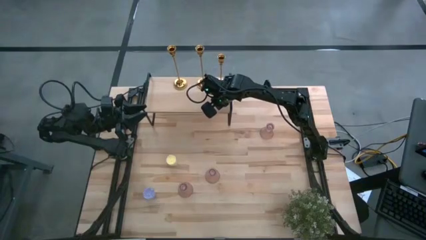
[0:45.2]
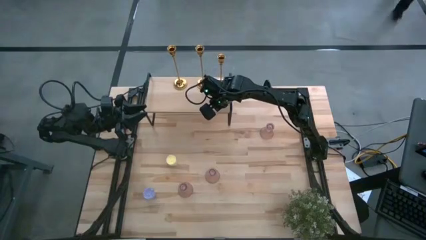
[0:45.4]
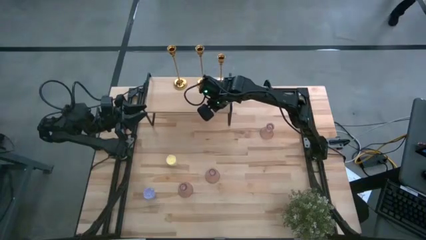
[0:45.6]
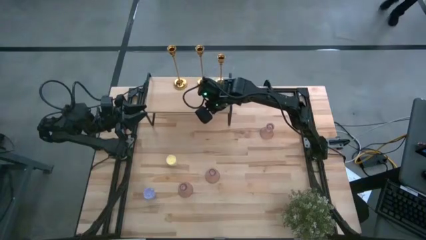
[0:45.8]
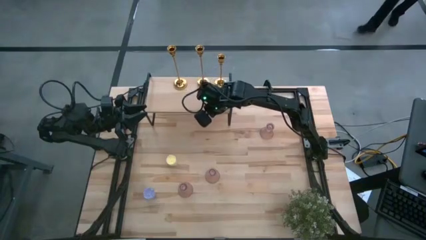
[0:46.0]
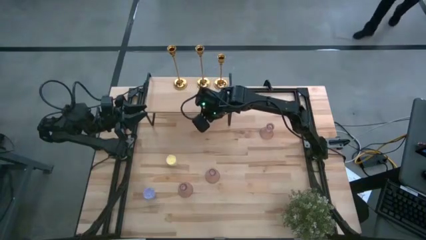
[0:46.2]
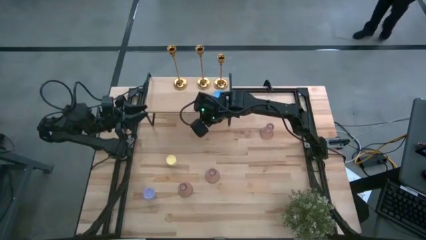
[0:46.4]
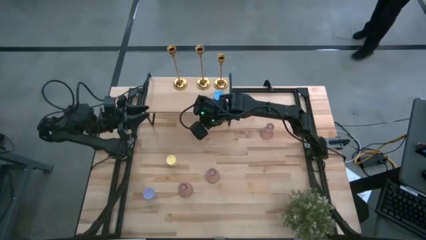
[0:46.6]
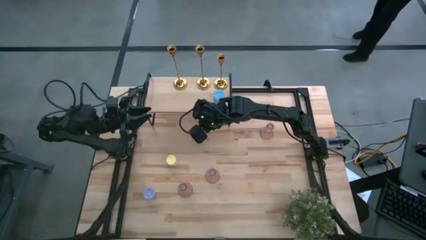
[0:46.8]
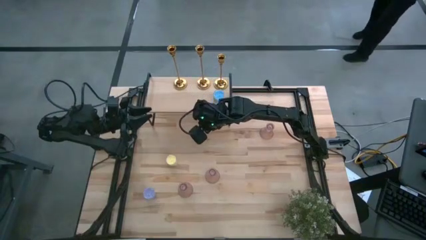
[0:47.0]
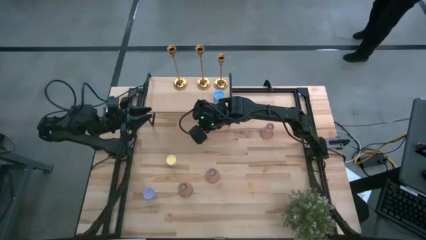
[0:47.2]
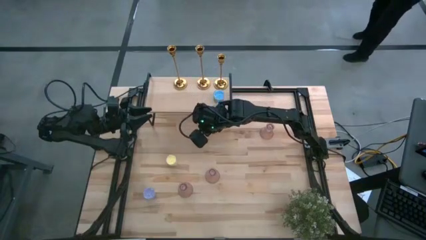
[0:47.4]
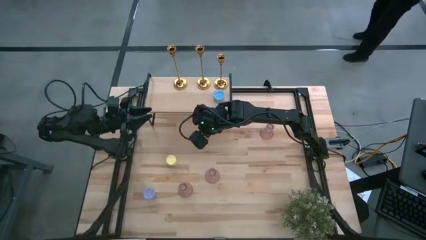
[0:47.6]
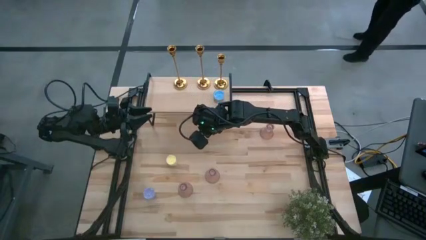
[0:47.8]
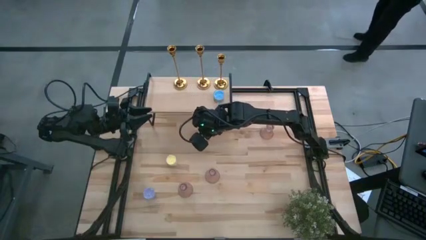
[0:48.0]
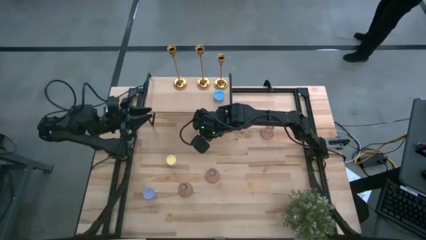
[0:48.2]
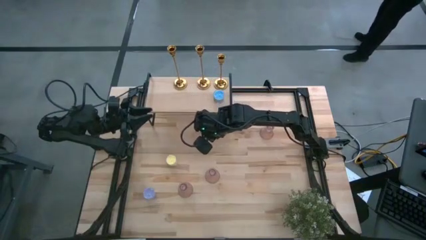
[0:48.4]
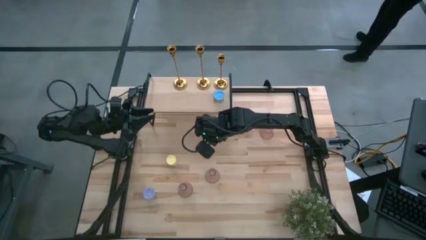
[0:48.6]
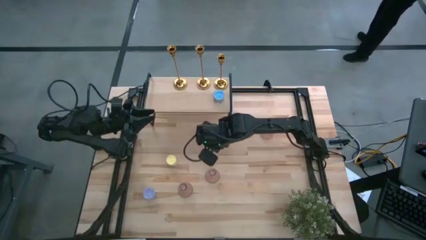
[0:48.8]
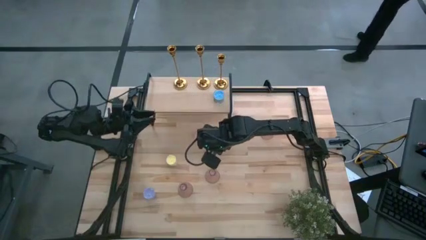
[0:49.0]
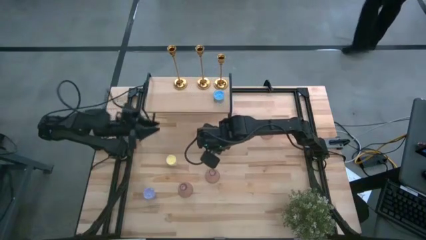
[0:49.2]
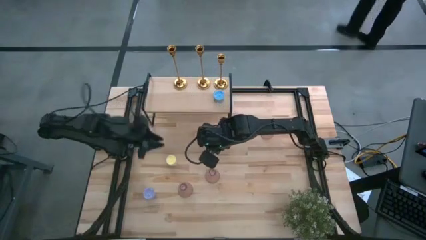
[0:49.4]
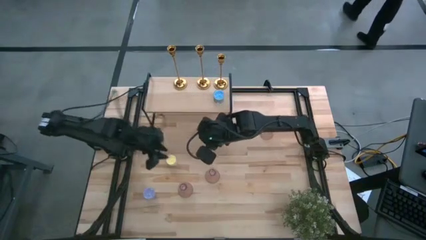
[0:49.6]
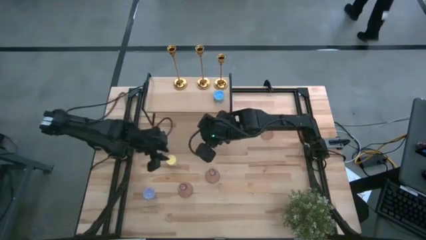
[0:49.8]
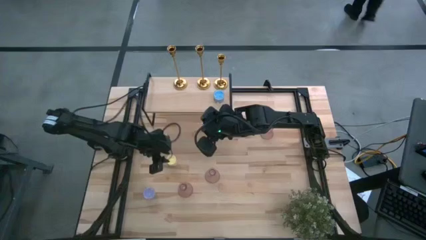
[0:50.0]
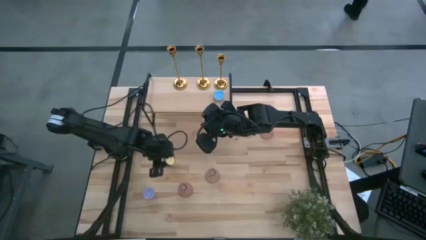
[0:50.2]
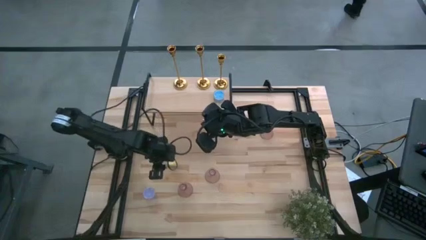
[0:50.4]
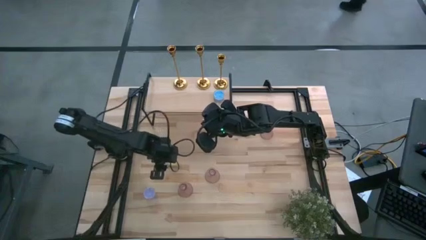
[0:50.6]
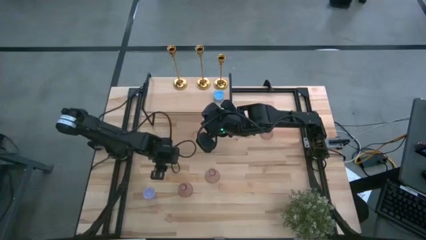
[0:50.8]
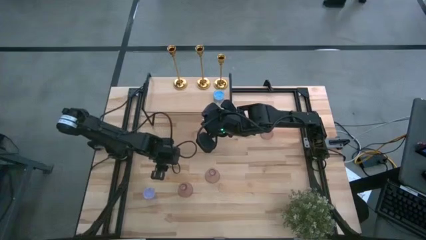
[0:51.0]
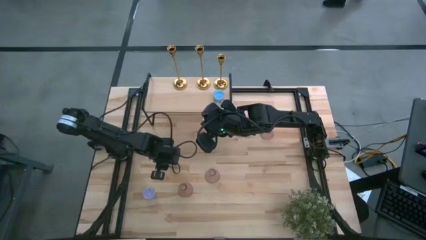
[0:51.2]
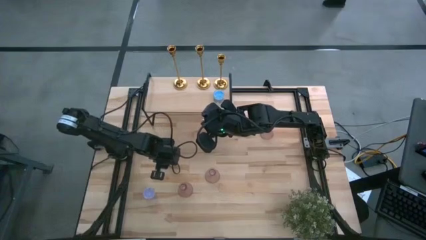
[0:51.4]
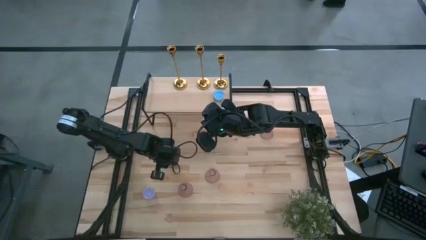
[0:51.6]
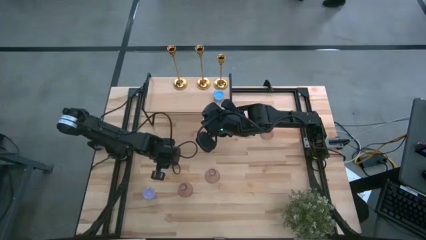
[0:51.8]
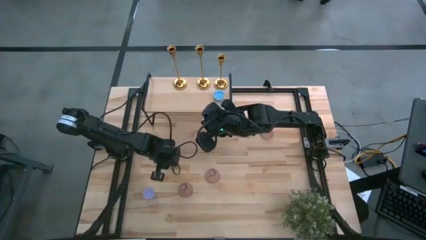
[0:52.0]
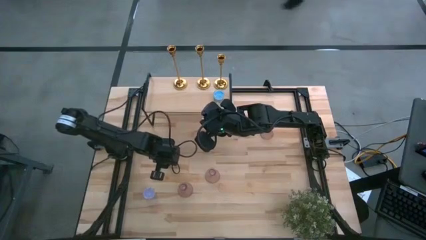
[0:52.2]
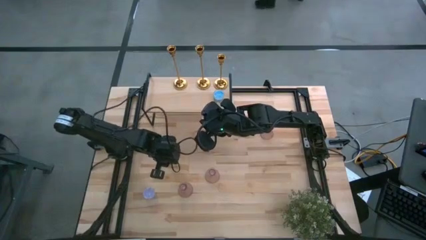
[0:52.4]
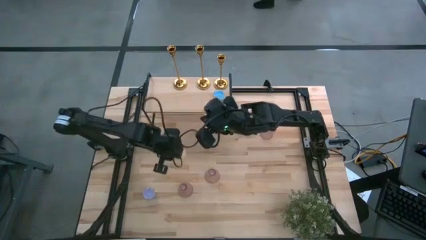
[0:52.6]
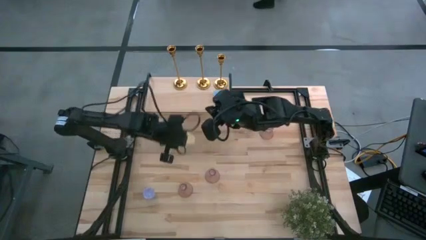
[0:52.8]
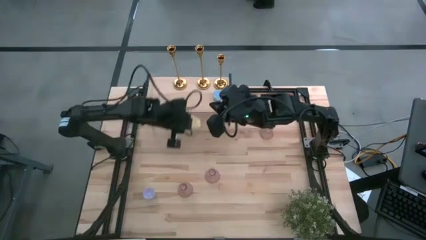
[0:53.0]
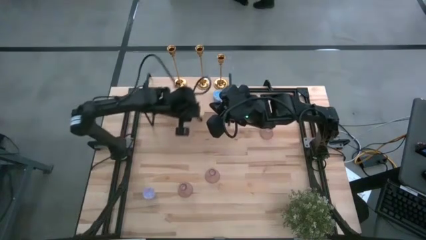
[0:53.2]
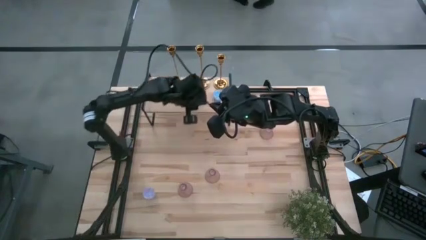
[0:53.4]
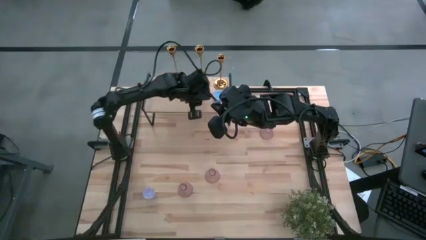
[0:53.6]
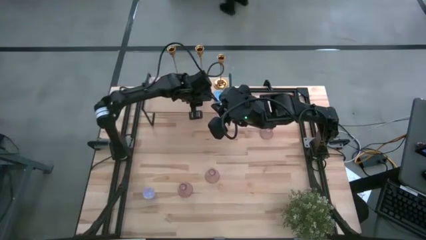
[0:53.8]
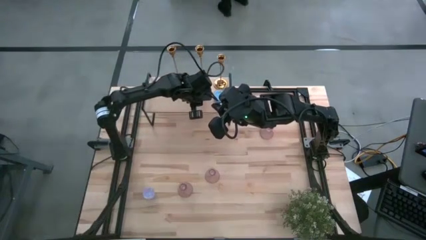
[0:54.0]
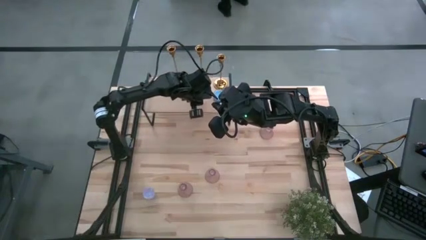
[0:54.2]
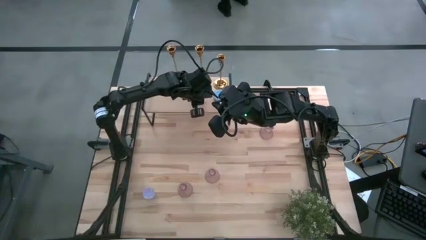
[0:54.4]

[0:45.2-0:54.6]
Task: Pick & Place candle stick holders
Put the yellow scented candle on the shelf aligned with the blue scented candle

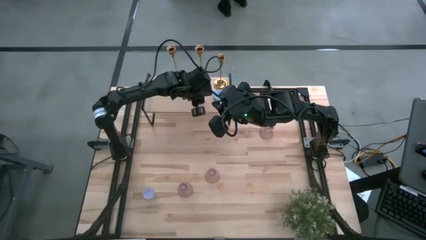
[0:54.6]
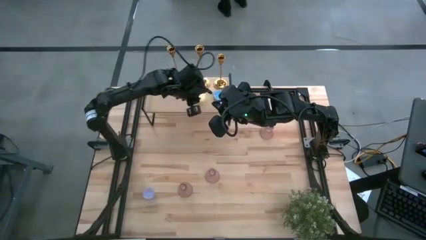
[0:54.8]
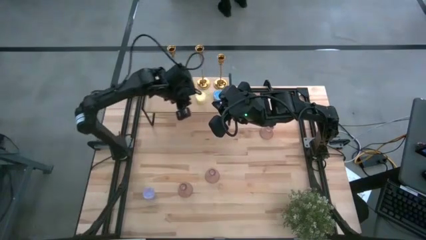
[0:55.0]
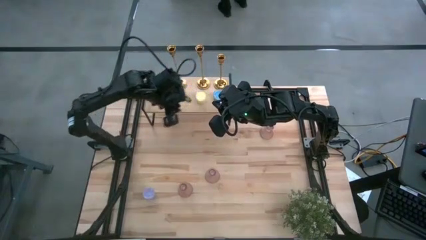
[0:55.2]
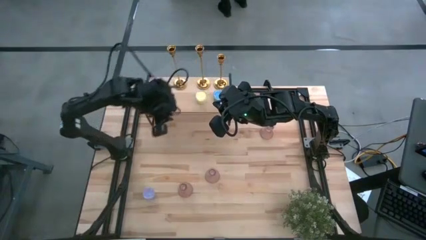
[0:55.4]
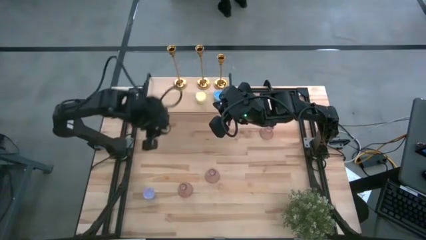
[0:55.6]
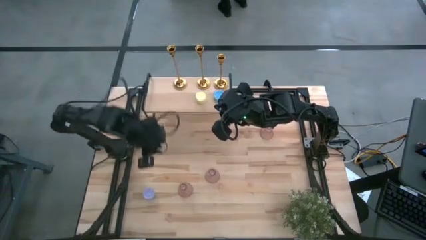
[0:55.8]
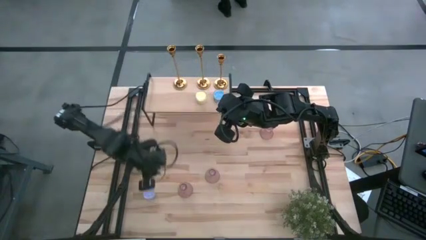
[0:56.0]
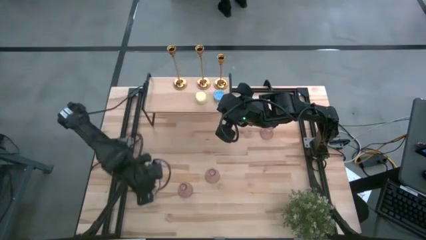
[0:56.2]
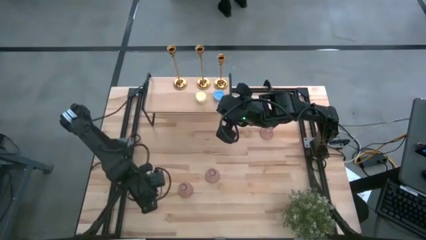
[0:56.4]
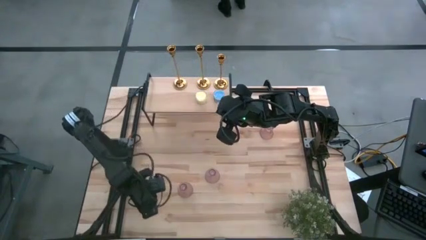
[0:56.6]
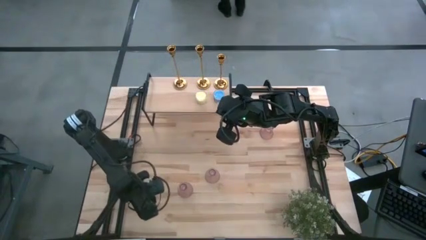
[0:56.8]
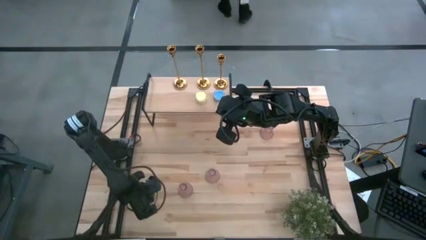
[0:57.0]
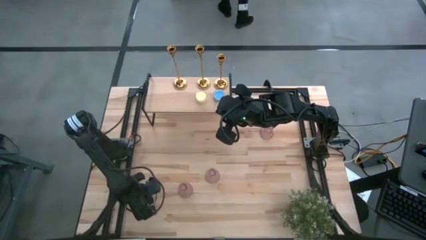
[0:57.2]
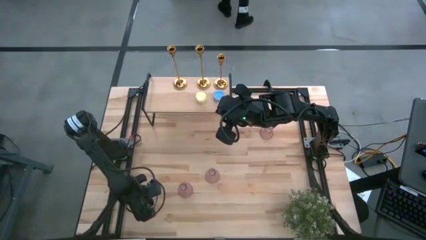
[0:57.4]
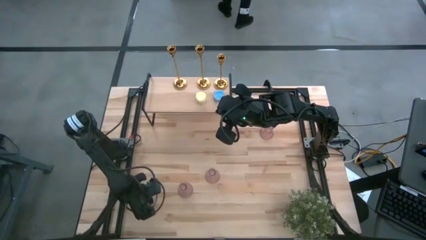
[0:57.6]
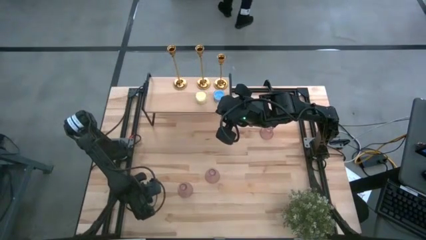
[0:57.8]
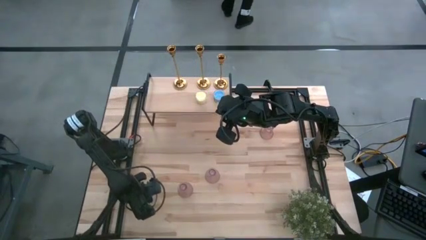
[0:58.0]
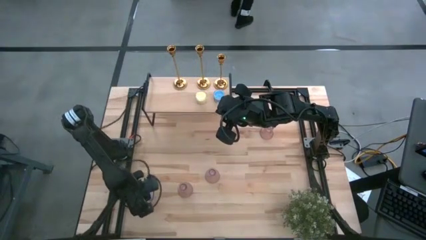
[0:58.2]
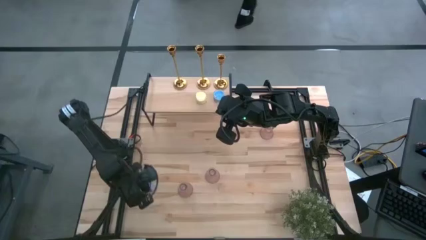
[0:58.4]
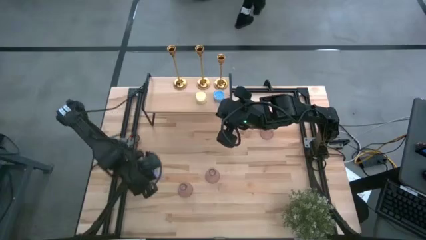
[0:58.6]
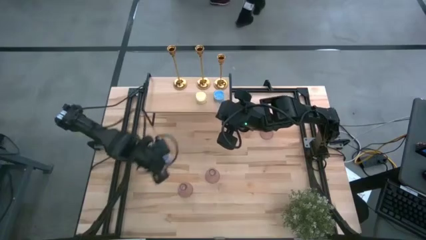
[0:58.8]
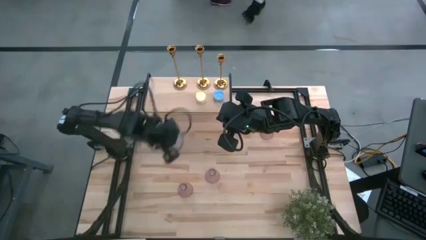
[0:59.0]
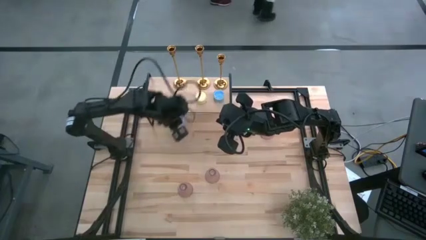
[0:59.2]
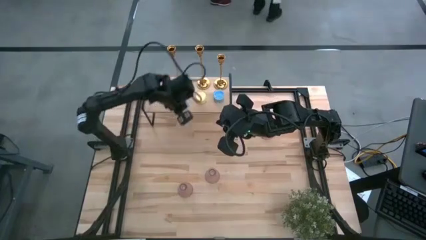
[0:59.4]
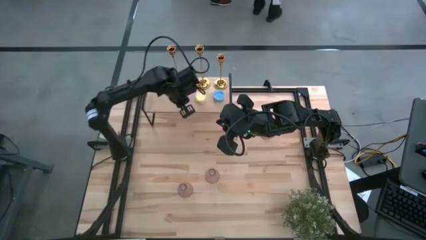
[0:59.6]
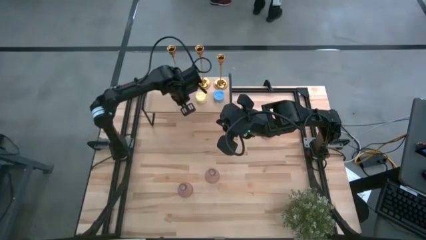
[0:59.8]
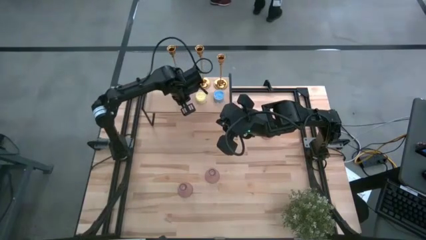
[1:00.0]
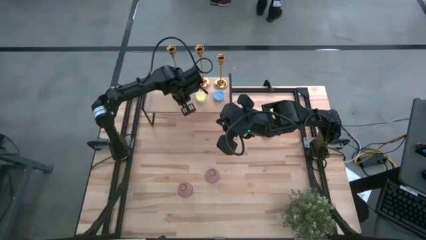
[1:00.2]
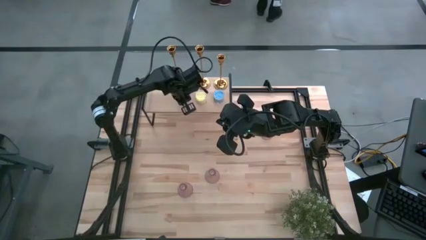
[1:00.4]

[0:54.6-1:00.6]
Put the violet scented candle on the shelf aligned with the yellow and blue scented candles
